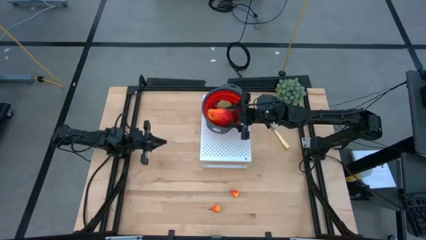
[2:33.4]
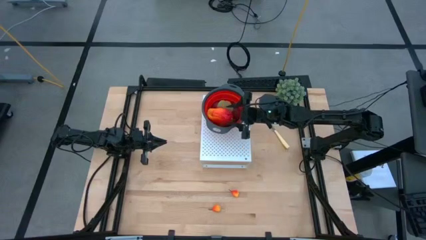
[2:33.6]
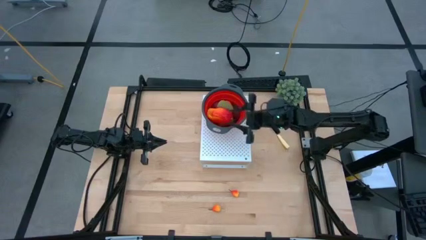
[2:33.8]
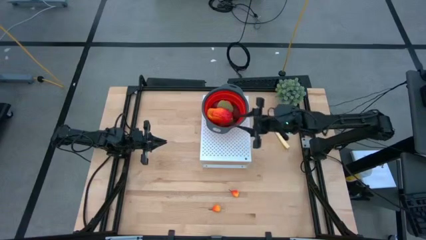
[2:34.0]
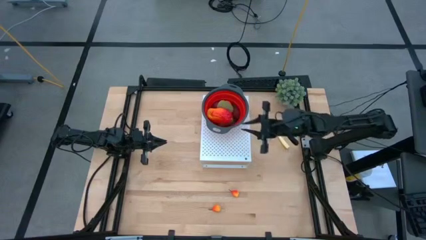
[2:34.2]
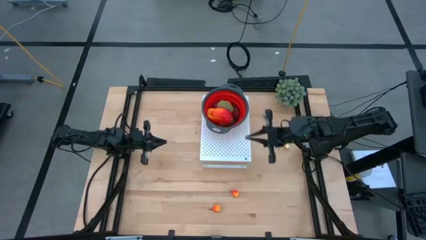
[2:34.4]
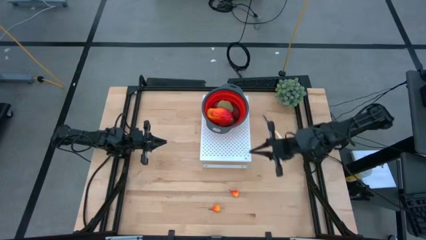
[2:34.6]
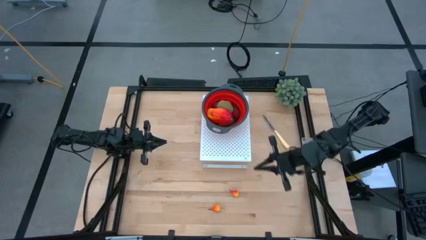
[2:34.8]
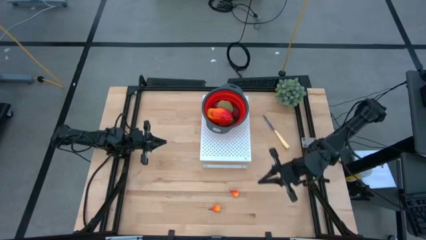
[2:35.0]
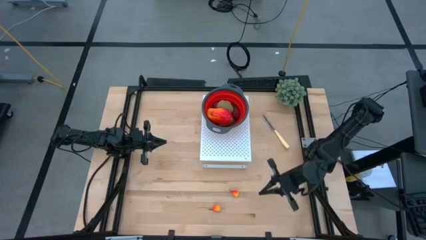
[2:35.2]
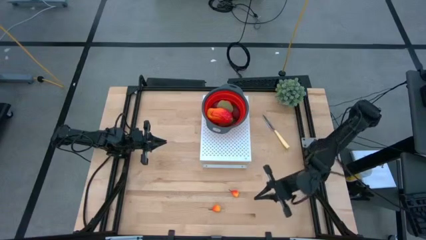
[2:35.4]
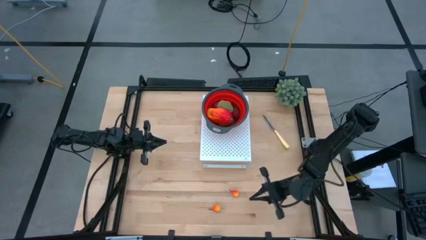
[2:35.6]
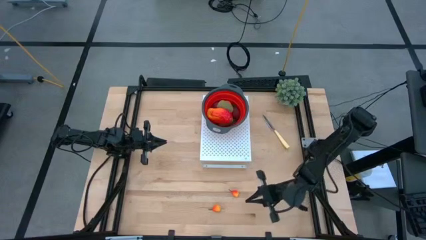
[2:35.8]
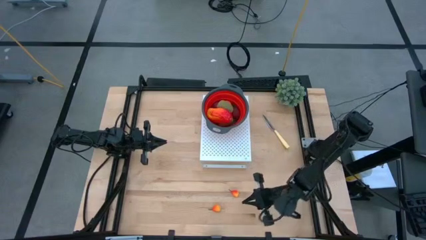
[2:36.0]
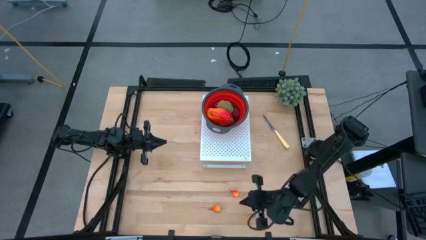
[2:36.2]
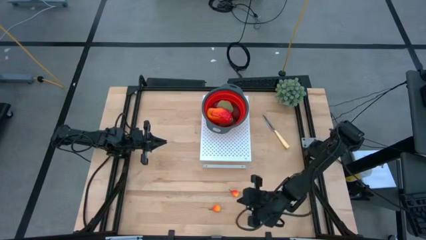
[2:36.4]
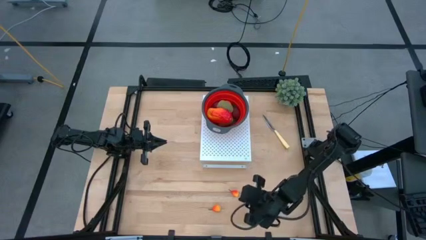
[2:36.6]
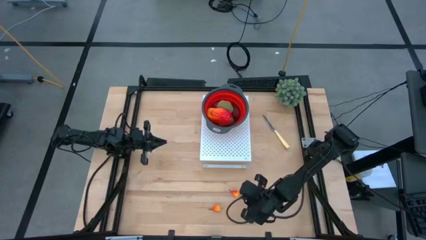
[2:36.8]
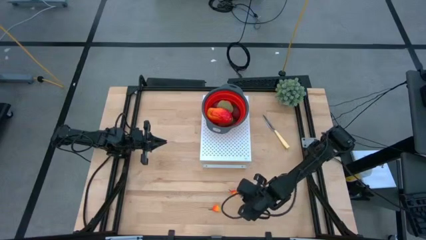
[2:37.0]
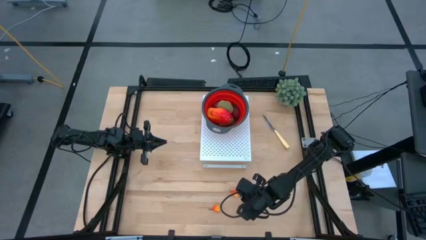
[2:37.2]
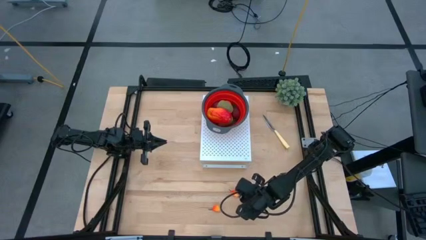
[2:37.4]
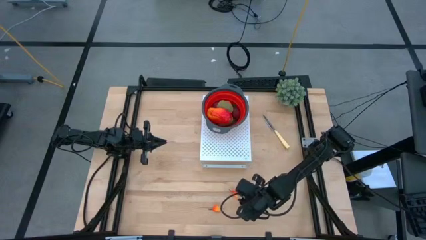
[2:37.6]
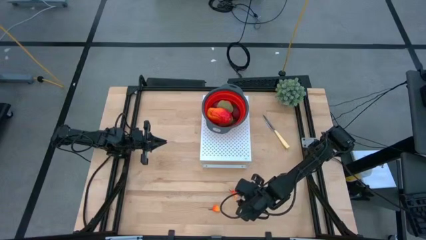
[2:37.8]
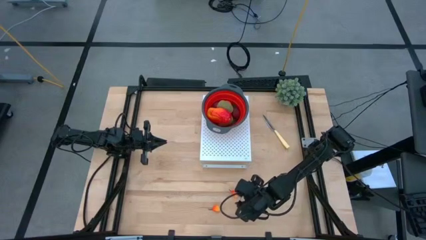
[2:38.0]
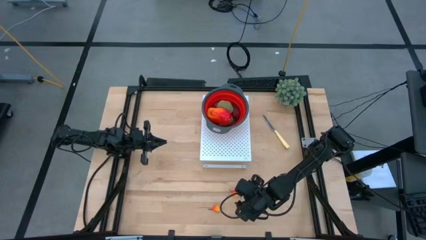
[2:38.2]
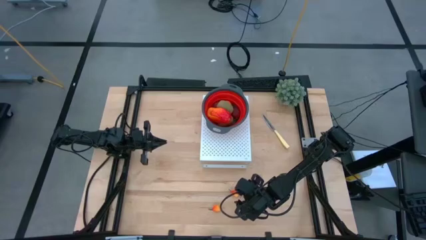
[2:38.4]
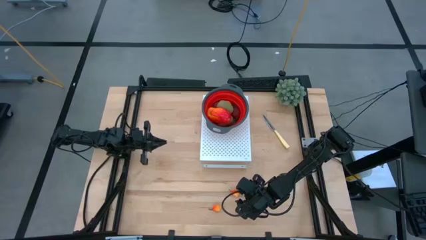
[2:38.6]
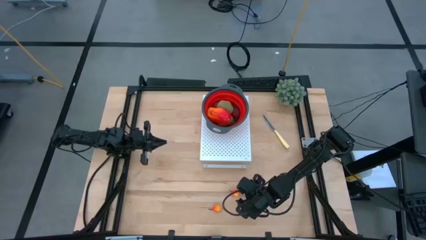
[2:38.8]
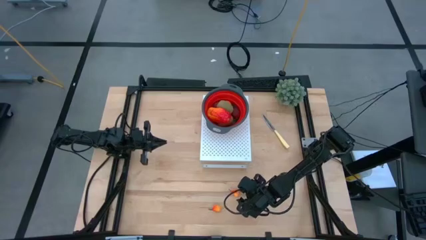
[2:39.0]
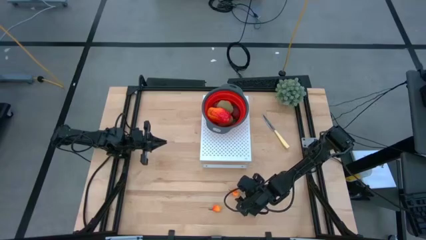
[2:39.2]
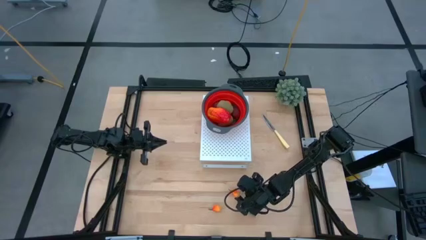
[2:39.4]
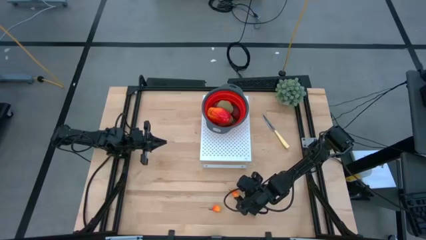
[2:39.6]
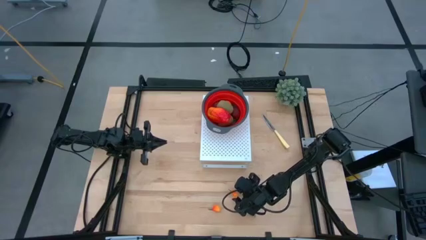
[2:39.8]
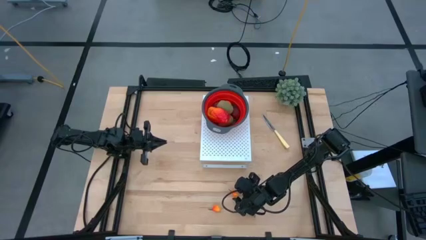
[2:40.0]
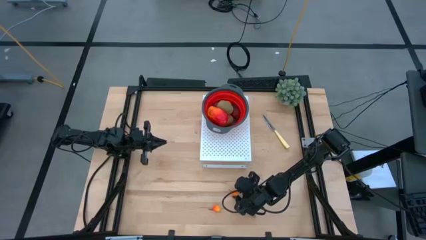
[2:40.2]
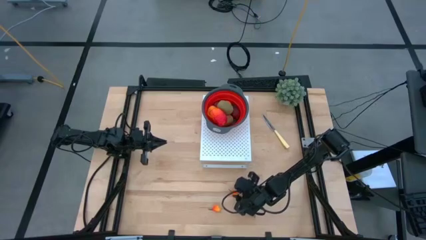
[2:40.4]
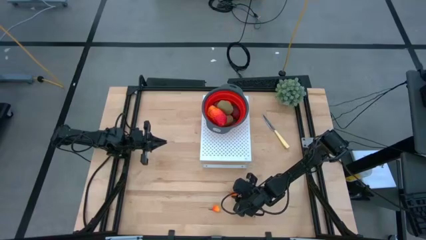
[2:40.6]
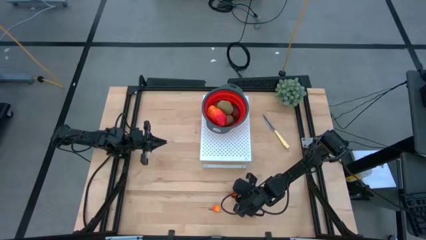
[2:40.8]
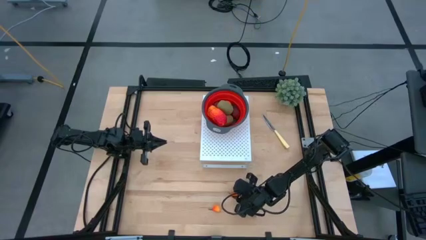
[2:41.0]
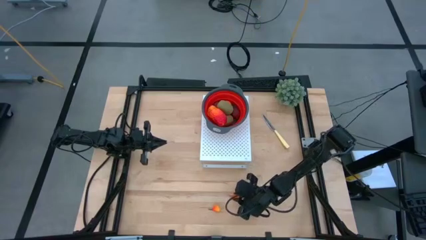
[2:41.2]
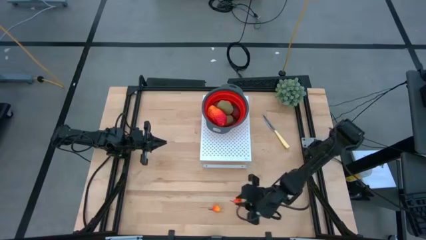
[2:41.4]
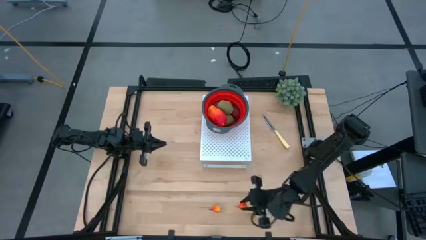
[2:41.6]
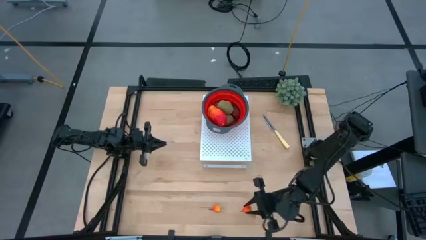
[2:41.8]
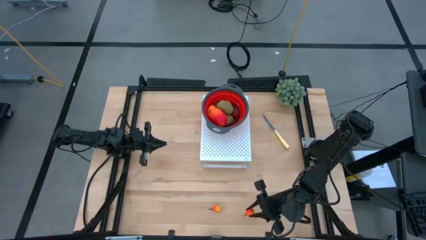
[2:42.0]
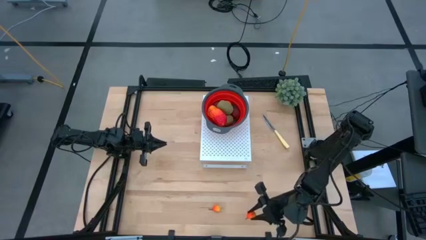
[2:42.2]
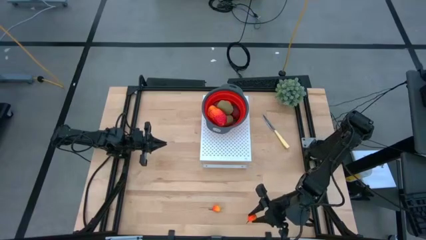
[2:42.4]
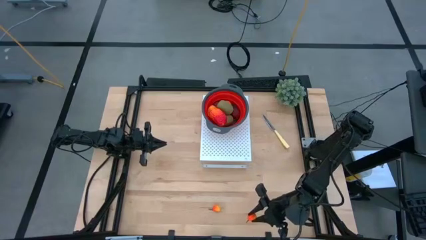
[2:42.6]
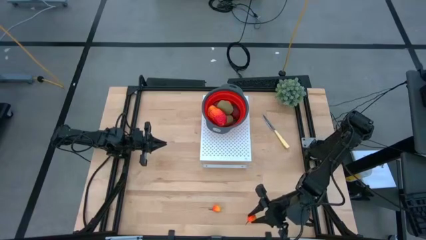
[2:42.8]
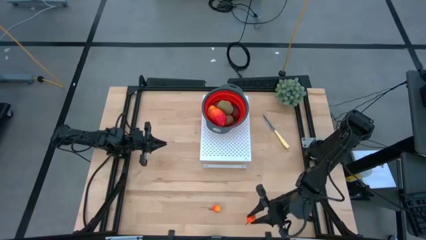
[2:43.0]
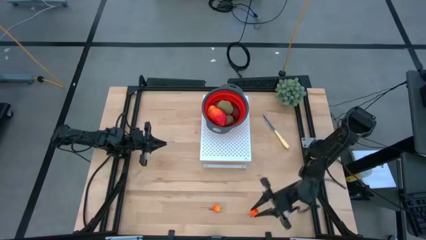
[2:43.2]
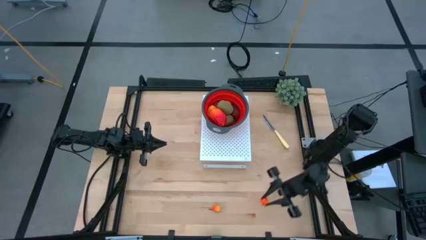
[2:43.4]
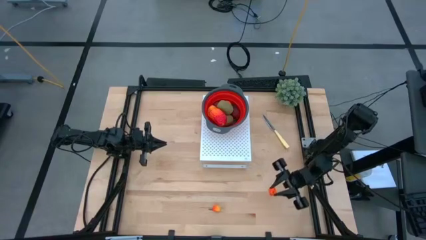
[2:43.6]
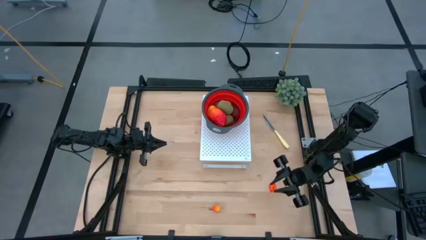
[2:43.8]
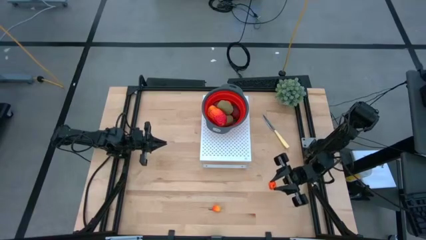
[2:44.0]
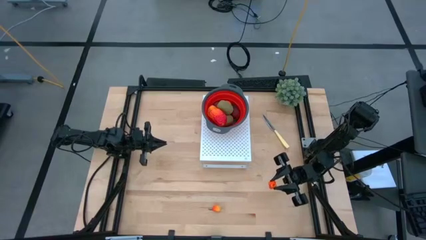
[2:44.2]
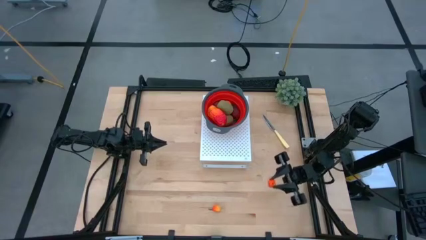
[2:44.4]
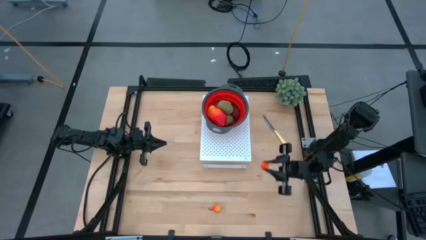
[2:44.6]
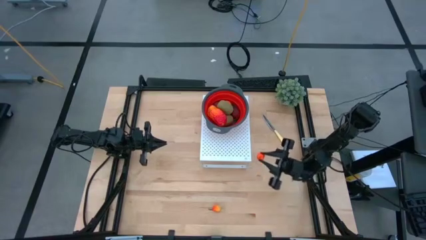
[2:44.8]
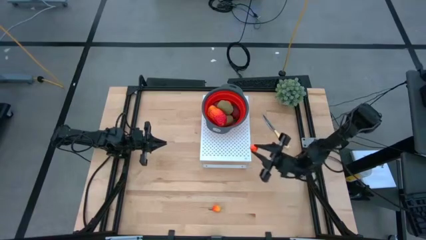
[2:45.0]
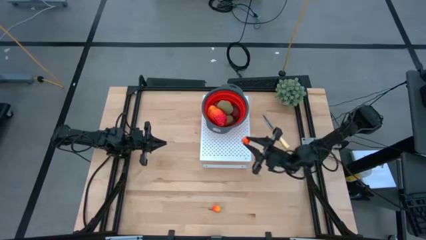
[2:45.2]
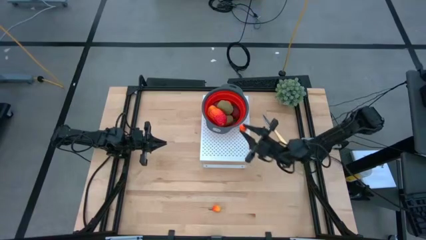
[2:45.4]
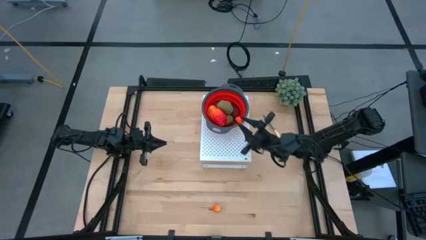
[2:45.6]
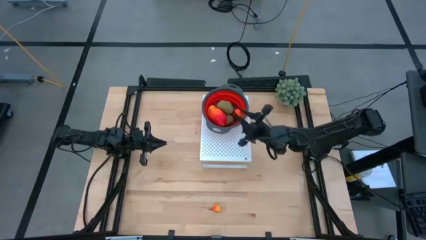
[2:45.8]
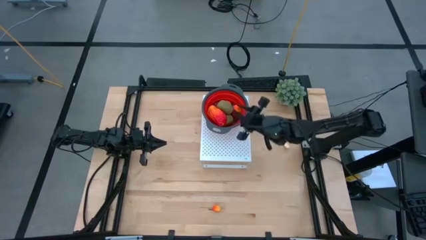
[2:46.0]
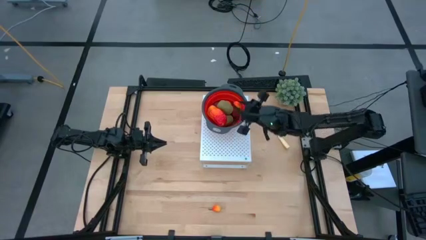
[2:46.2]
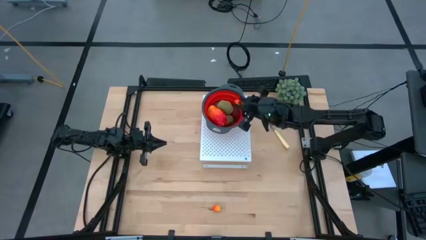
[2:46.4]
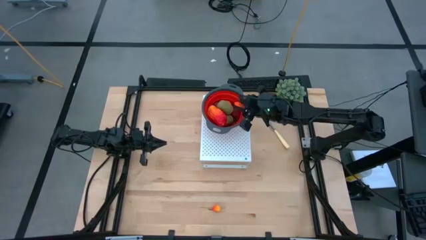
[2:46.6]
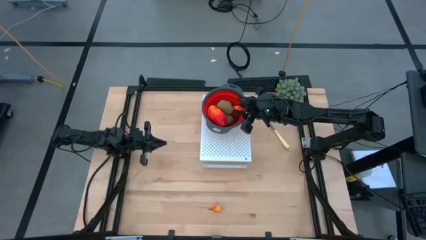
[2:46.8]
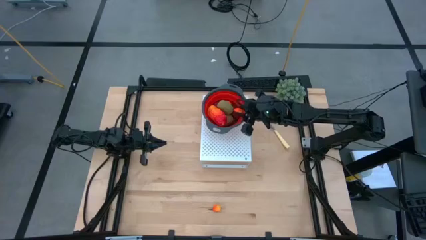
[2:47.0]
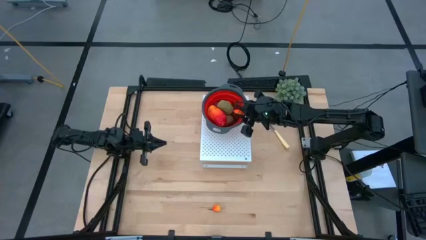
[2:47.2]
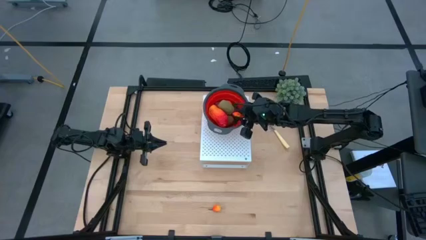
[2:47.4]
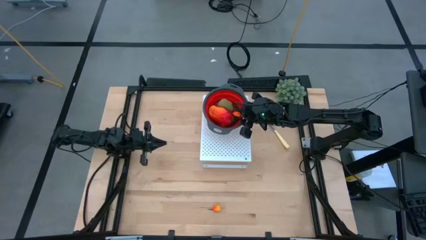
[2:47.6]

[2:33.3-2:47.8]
Task: Pick & Place Fruit
Put the orange pear into the red strainer bowl

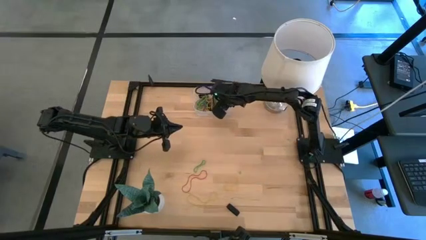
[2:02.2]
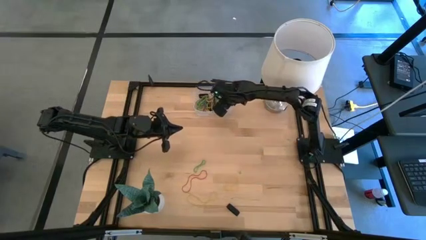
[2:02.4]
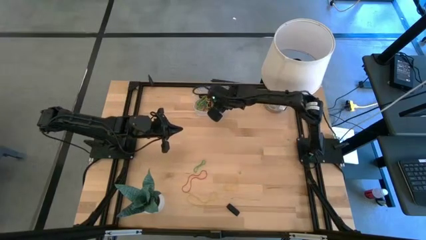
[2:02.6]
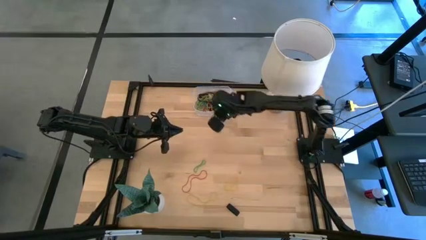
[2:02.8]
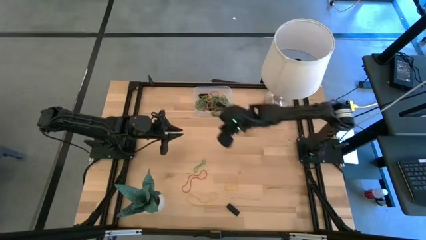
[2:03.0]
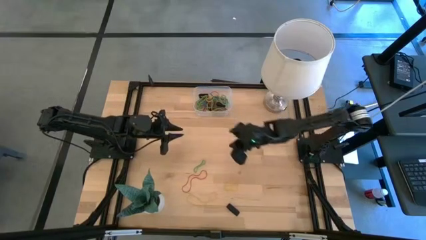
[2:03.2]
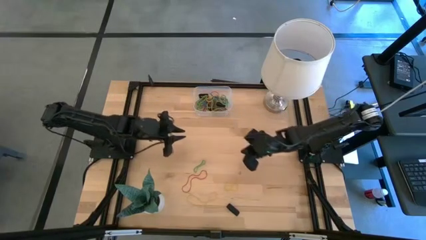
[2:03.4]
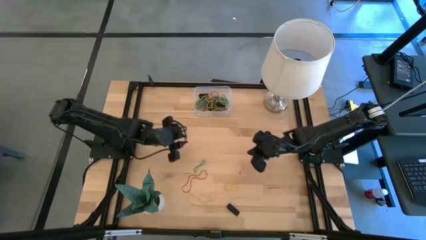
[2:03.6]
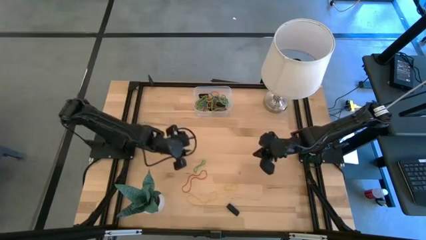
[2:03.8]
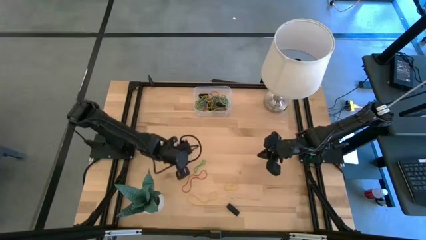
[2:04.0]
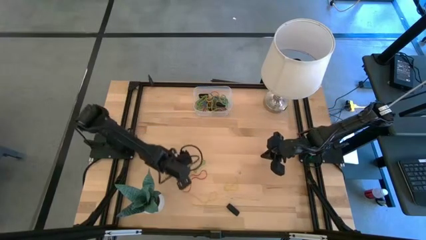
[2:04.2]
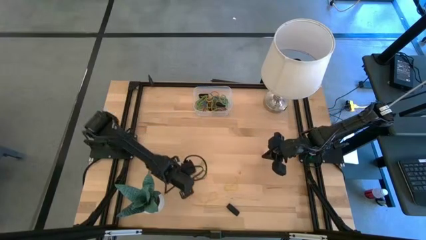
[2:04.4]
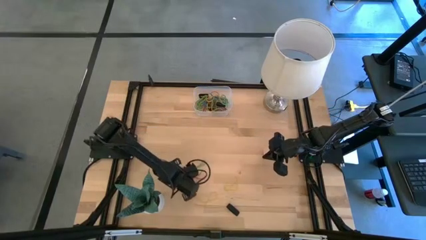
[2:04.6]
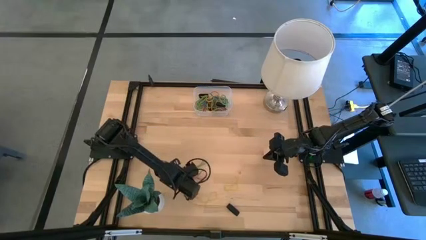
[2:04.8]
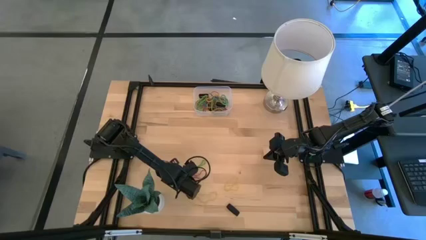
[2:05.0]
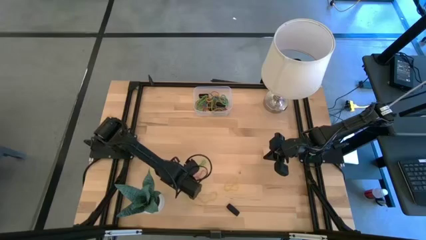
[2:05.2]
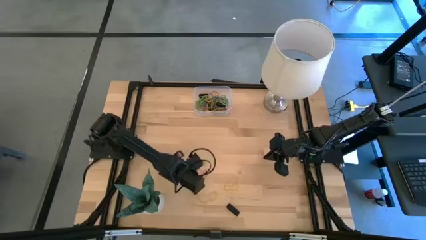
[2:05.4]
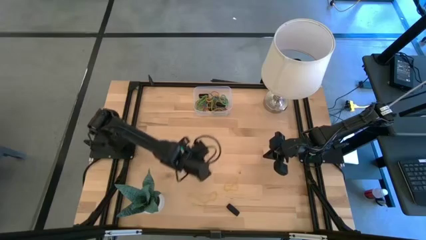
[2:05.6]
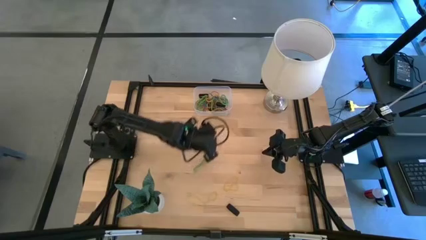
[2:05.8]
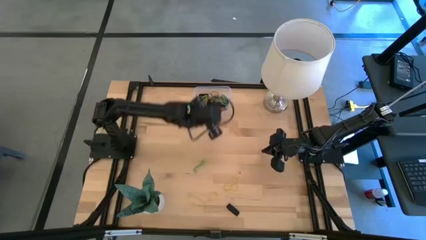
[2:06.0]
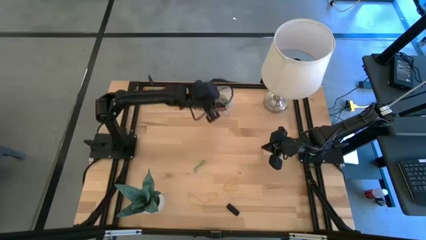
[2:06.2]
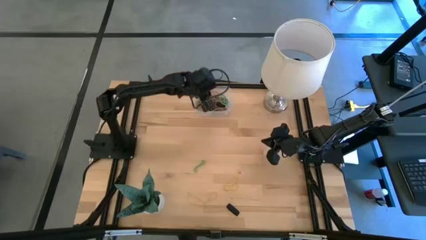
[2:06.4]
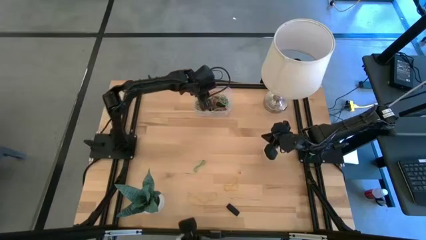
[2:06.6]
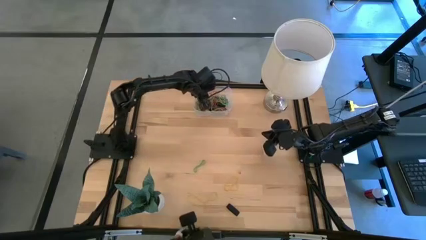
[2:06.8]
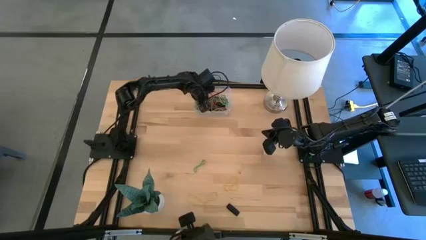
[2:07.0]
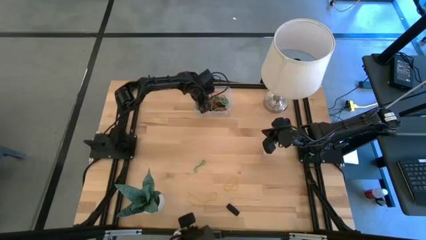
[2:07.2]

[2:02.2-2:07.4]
Task: Pick and place rubber bands into bin
Put the red rubber band into the transparent bin
